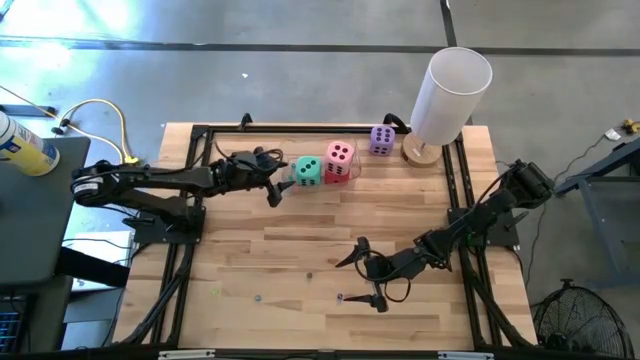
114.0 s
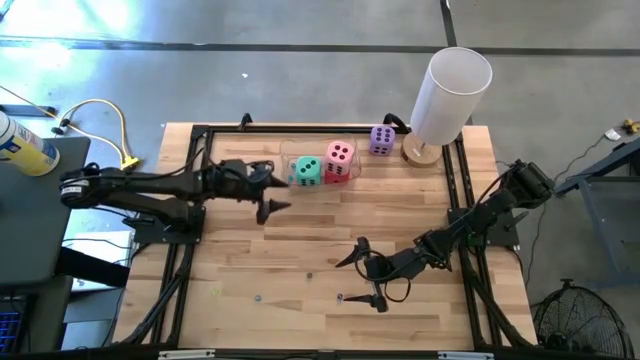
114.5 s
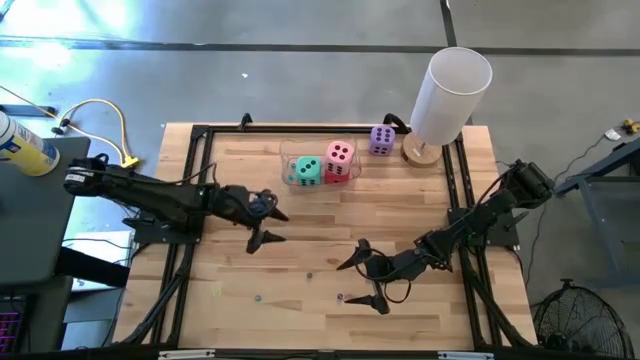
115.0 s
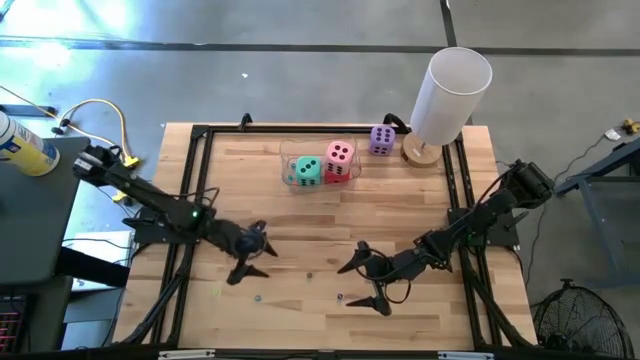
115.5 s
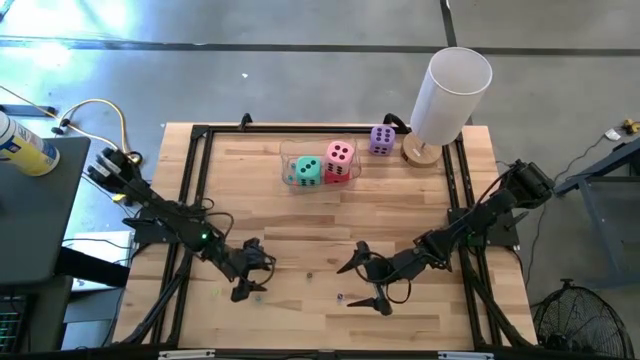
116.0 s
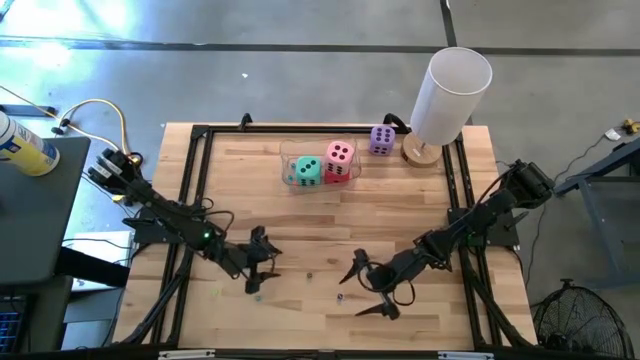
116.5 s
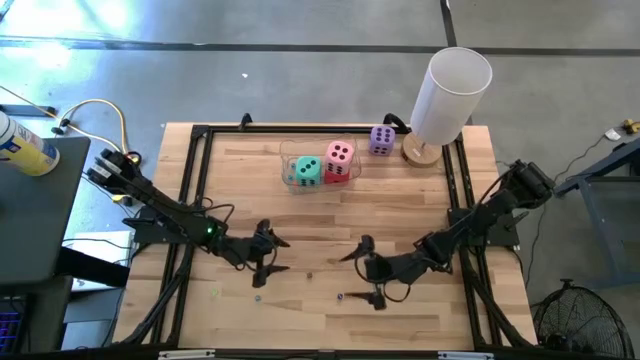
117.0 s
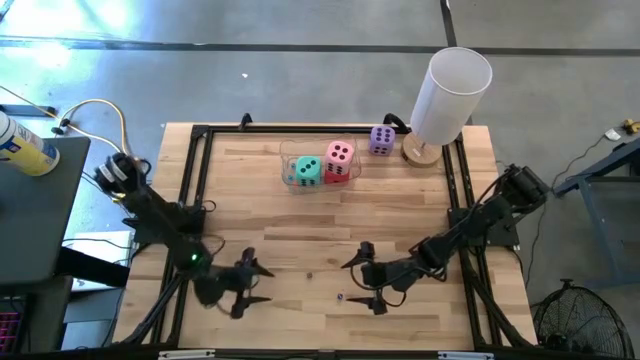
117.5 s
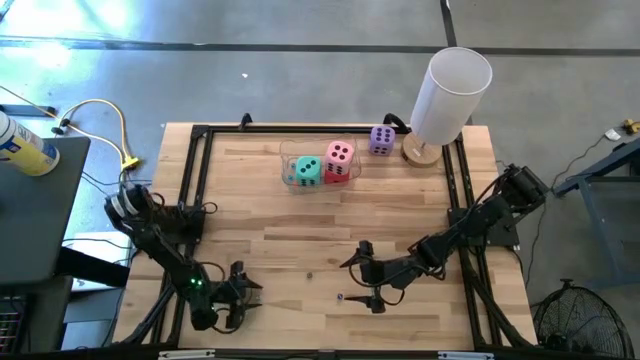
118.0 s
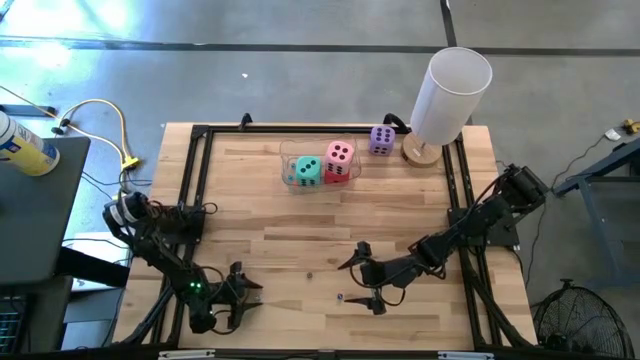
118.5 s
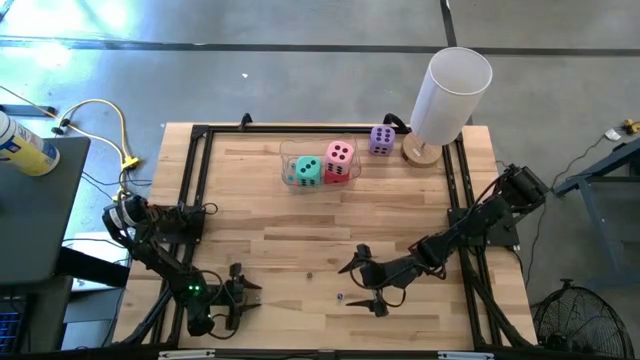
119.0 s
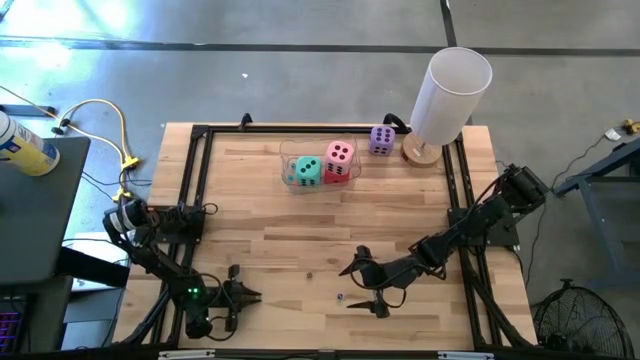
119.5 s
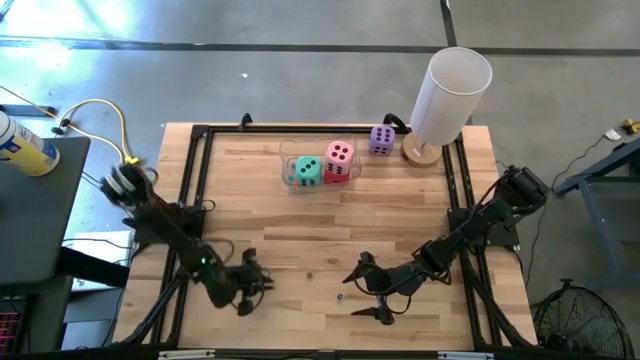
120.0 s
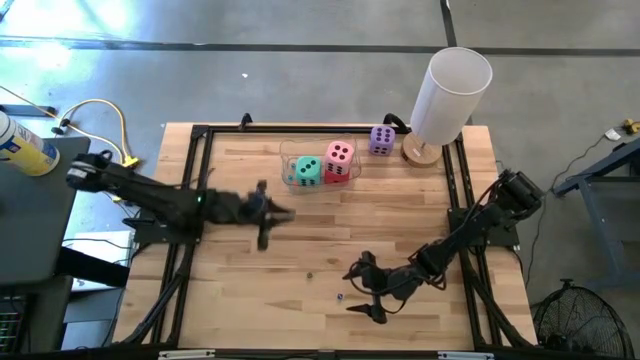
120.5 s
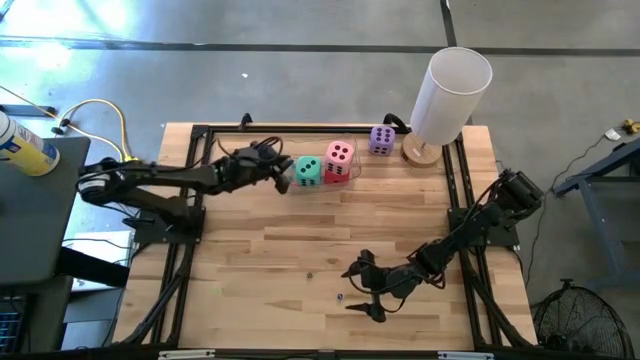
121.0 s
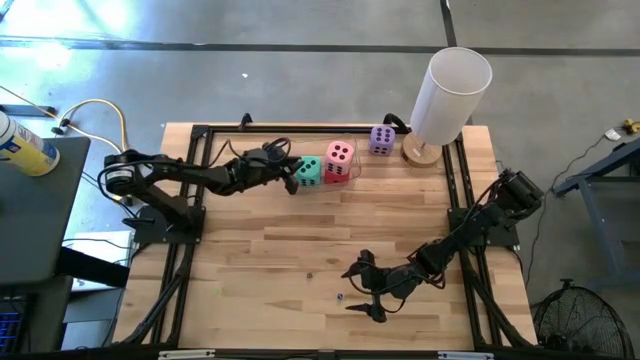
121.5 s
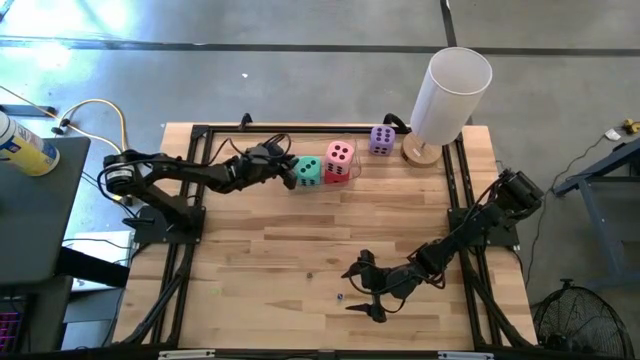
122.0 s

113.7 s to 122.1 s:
Task: Pick & Place Dice
Put the small light blue dice into the transparent bin

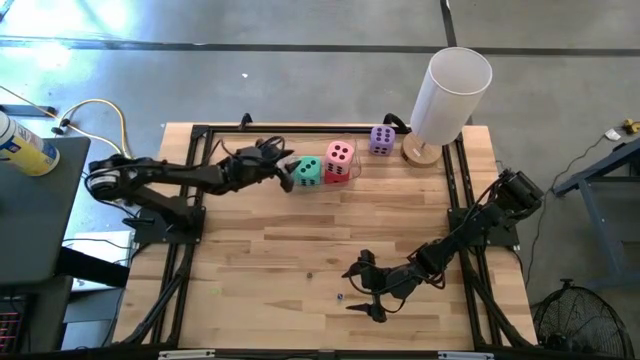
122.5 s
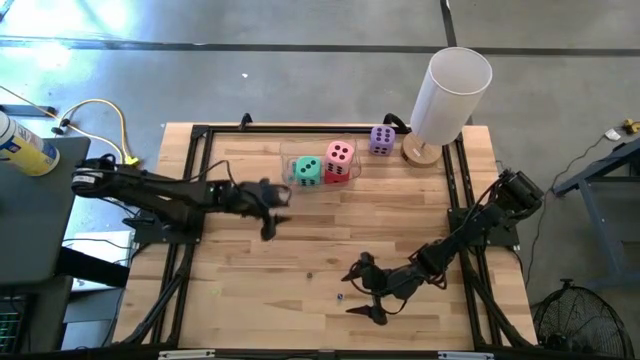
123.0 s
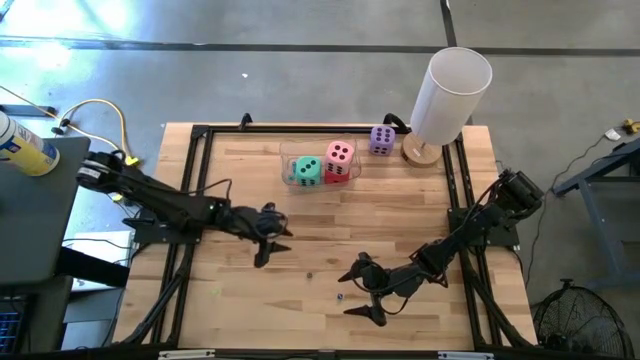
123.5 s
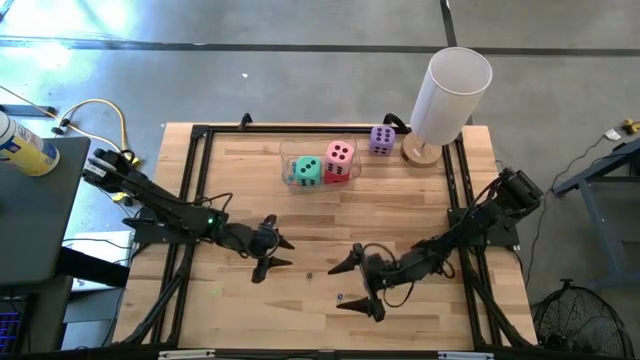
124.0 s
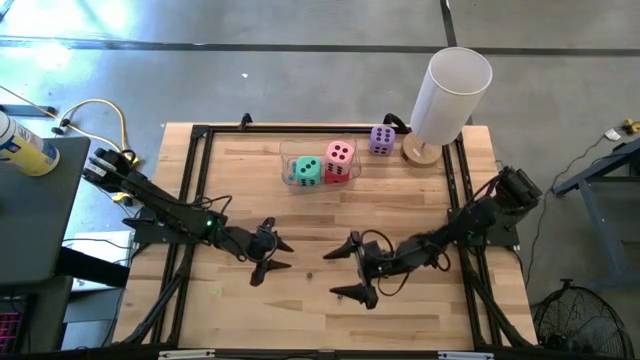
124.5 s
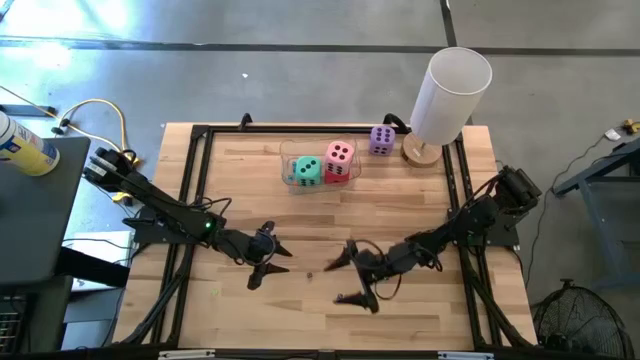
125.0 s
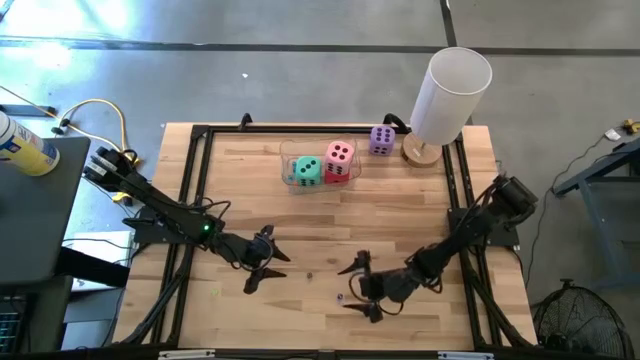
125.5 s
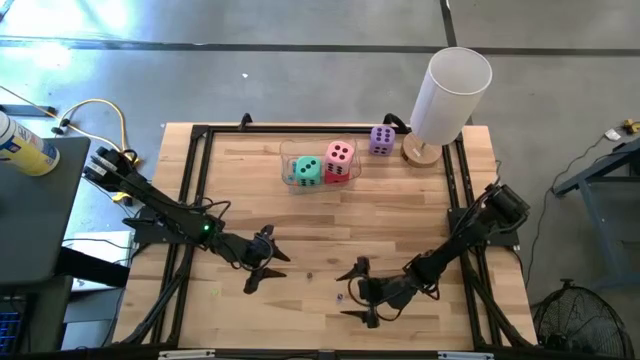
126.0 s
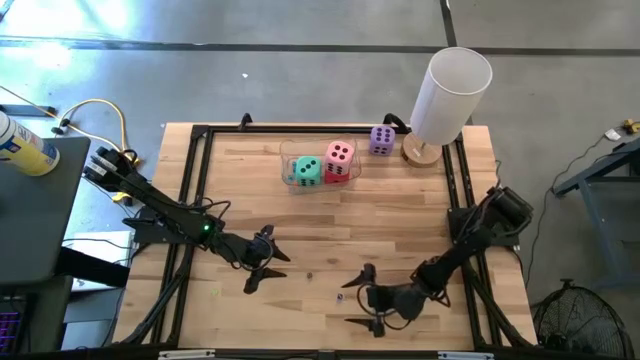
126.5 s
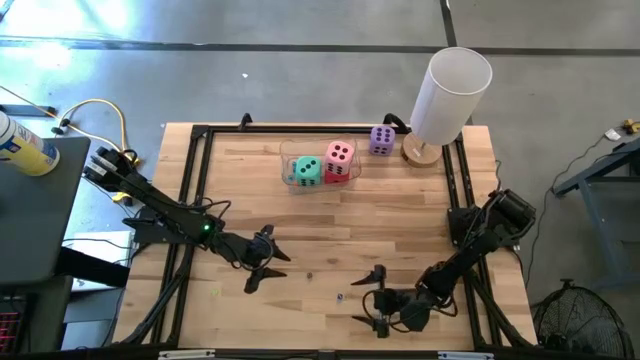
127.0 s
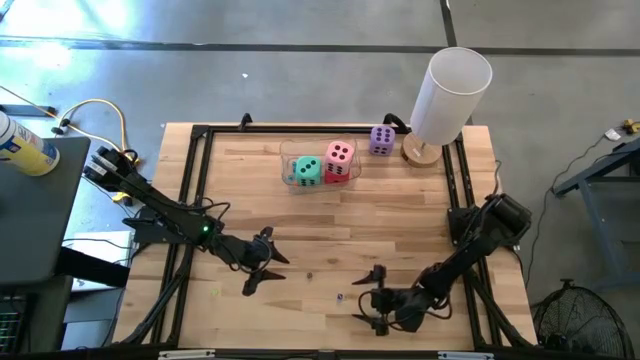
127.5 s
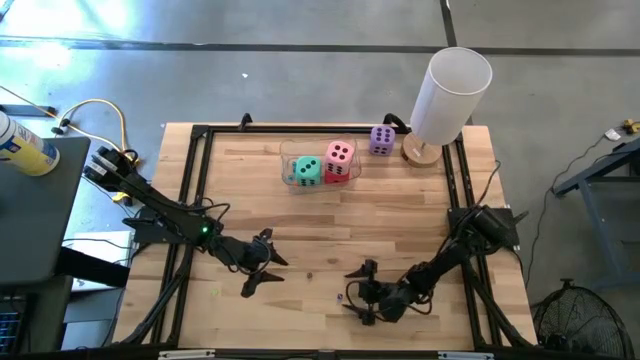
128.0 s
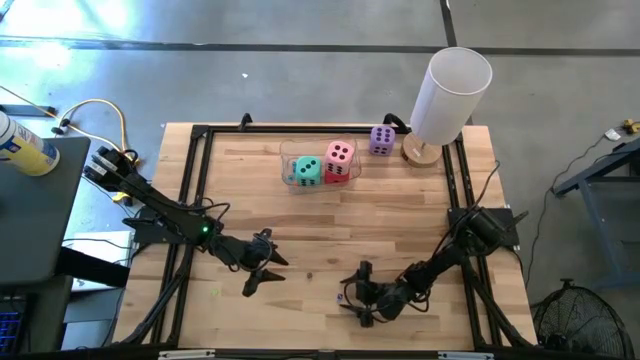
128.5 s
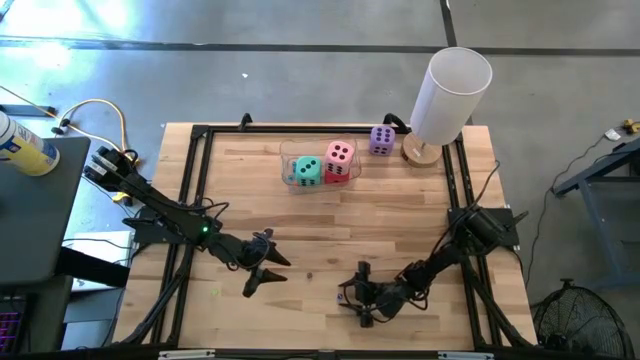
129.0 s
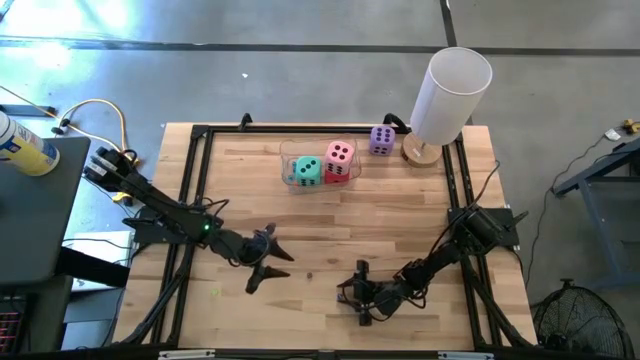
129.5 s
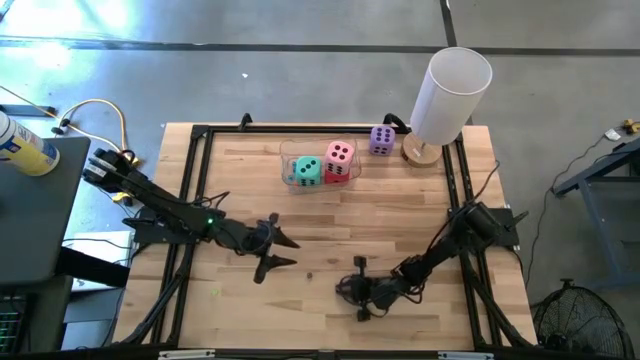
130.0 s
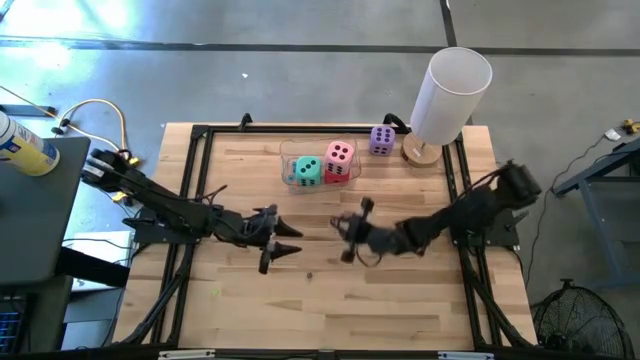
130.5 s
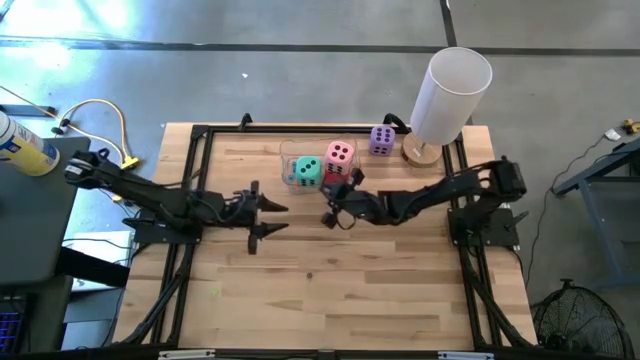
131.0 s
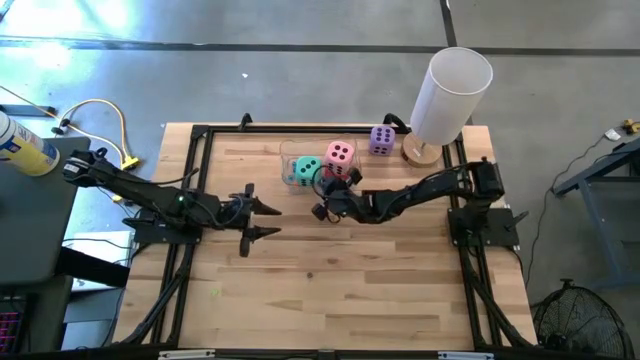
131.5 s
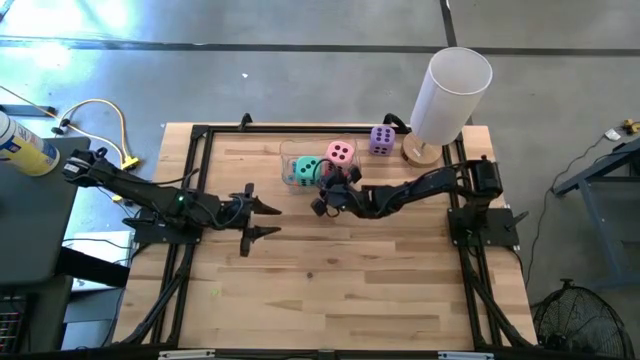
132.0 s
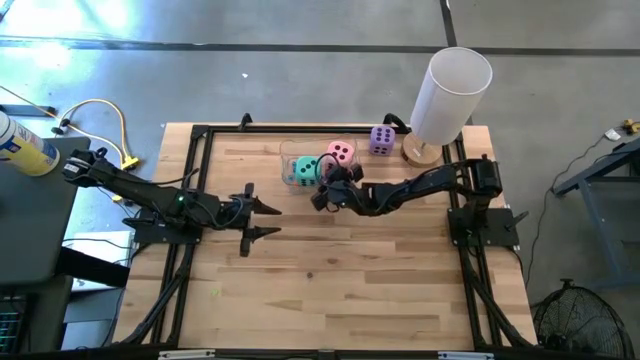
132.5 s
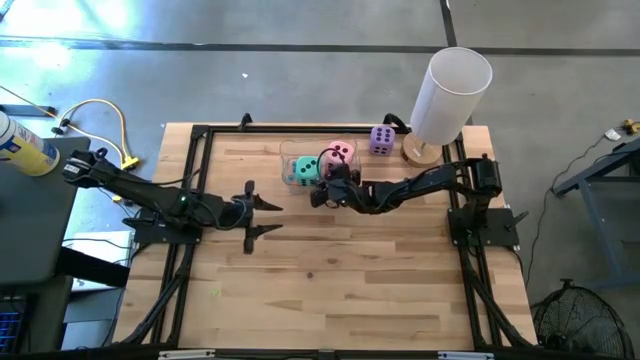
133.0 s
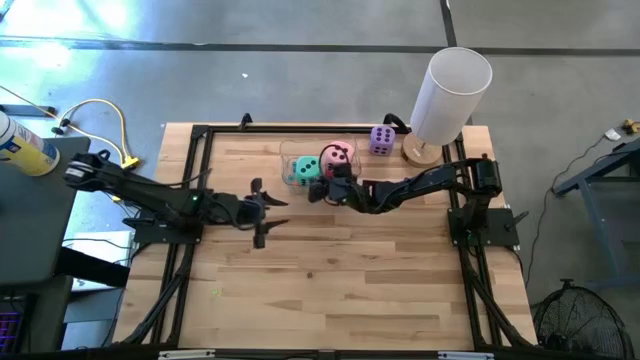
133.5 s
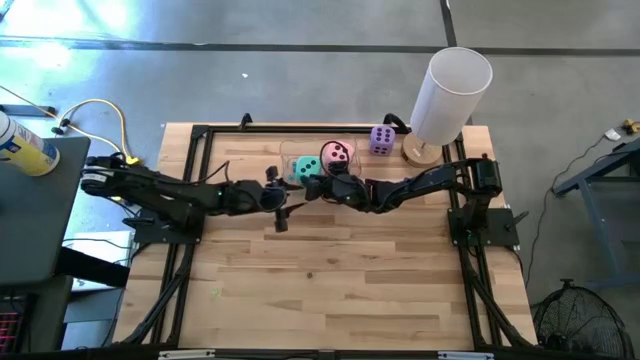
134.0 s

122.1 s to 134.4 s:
Put the small blue dice into the transparent bin
